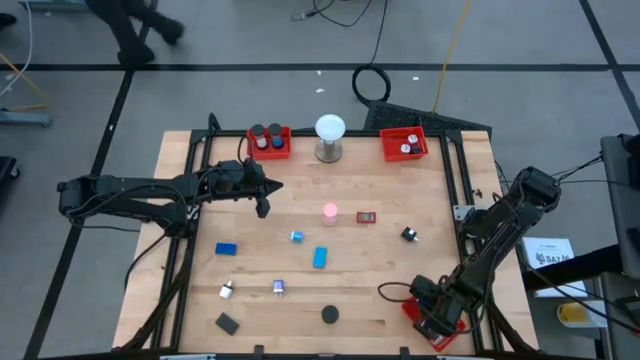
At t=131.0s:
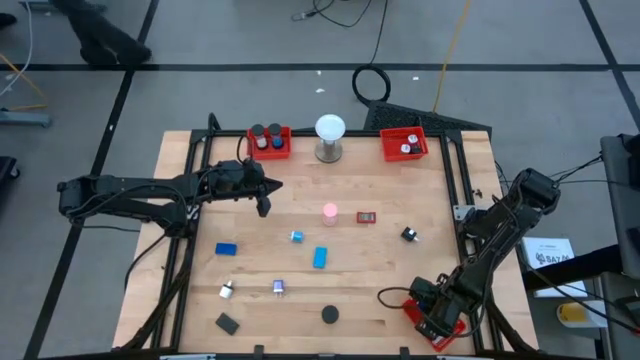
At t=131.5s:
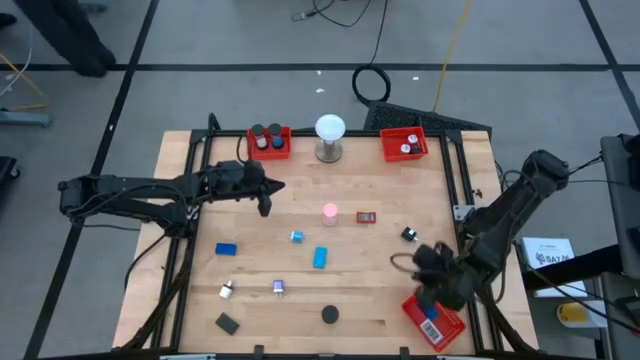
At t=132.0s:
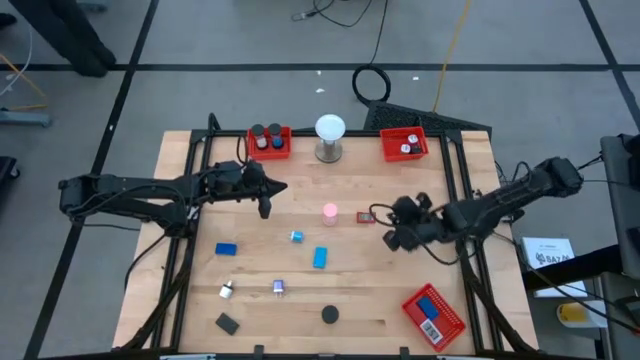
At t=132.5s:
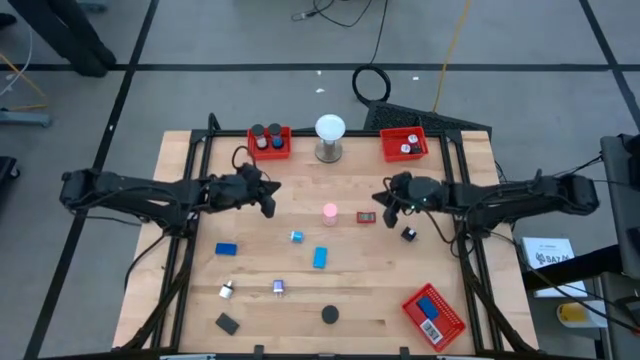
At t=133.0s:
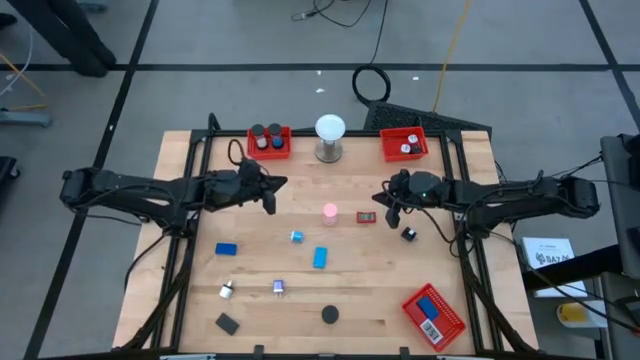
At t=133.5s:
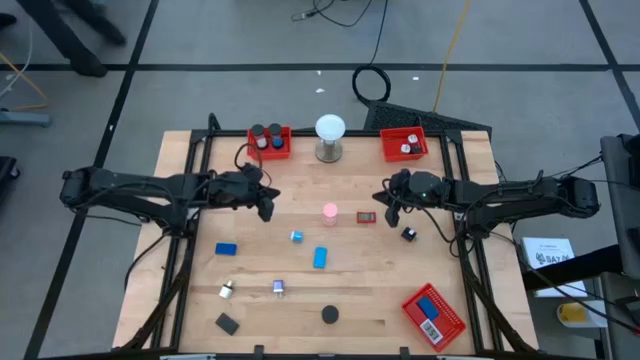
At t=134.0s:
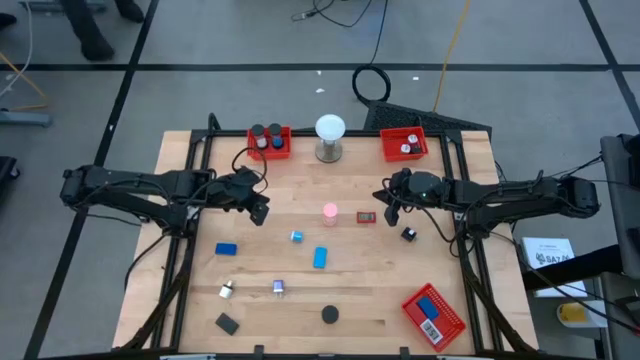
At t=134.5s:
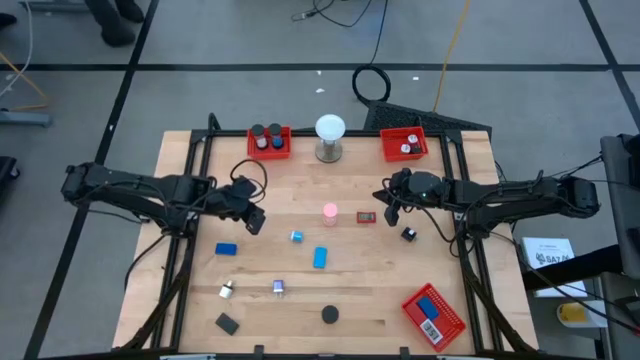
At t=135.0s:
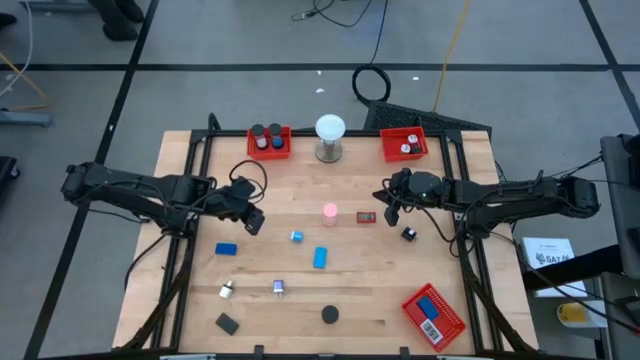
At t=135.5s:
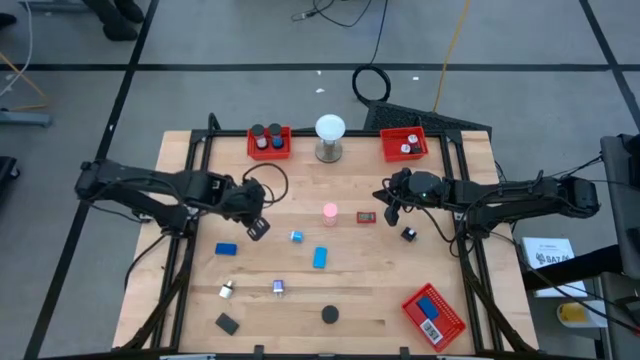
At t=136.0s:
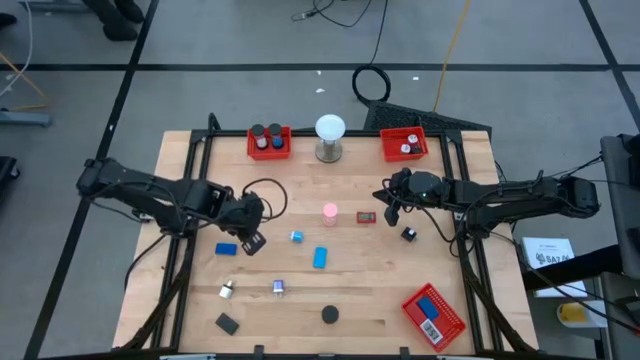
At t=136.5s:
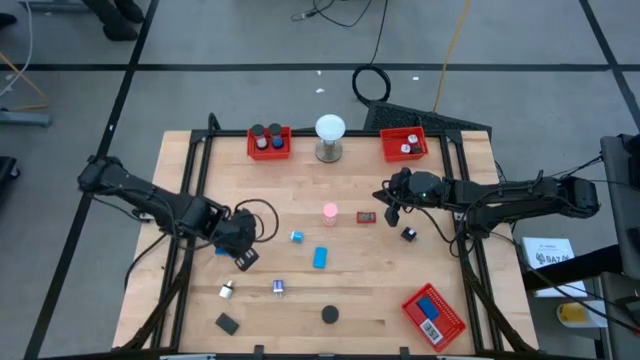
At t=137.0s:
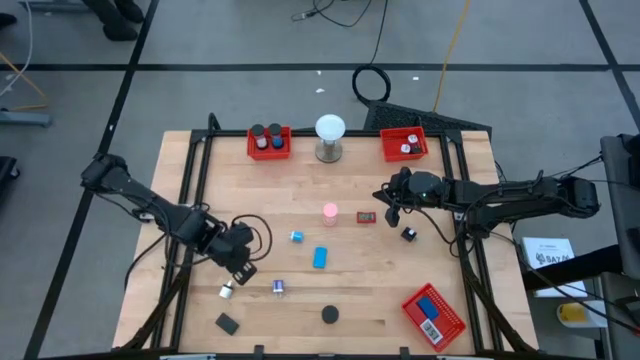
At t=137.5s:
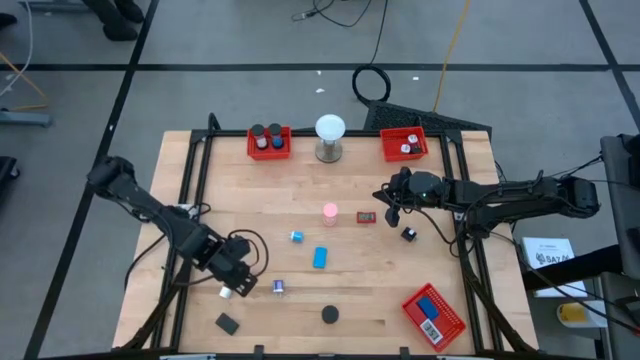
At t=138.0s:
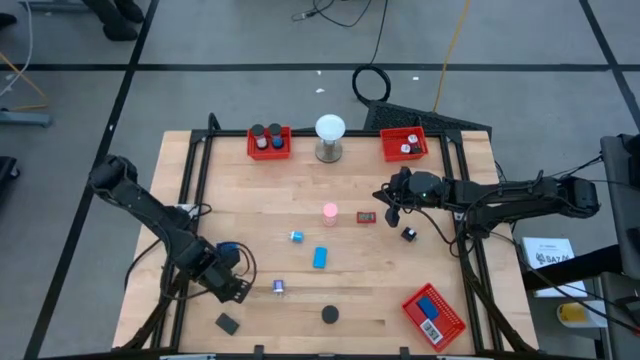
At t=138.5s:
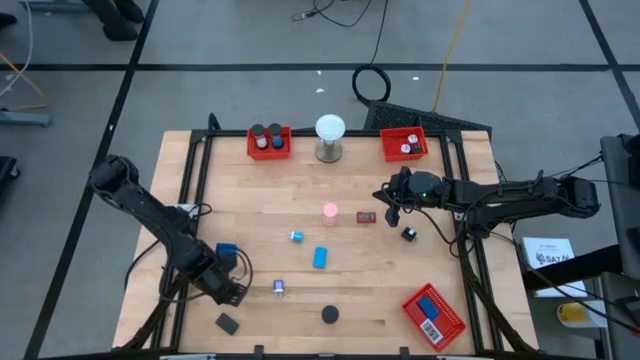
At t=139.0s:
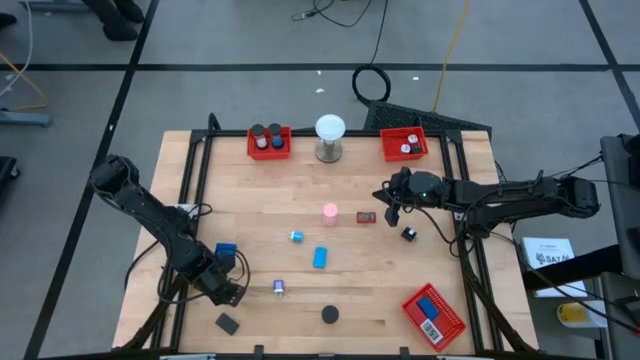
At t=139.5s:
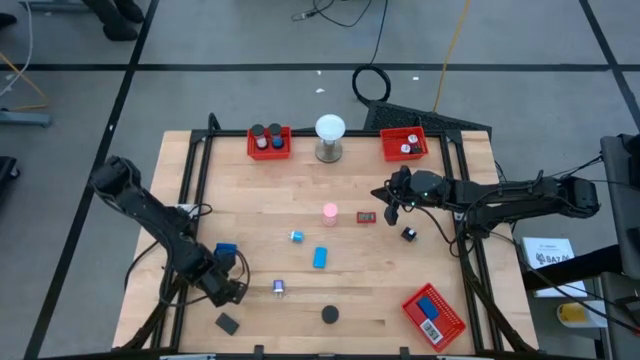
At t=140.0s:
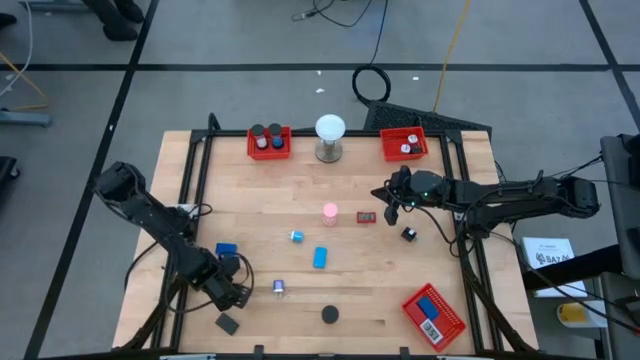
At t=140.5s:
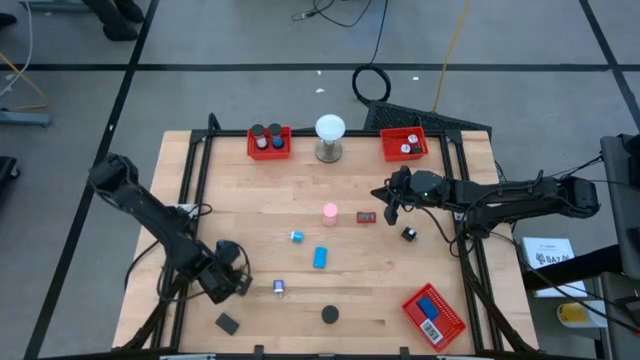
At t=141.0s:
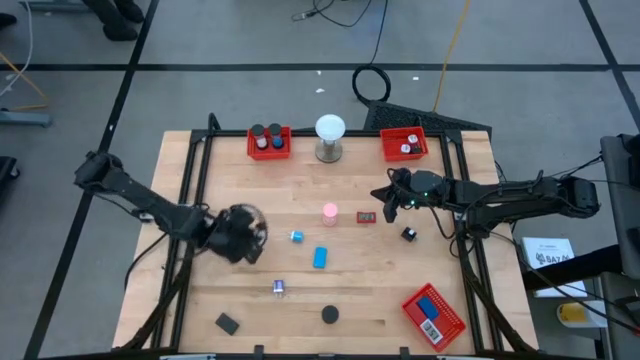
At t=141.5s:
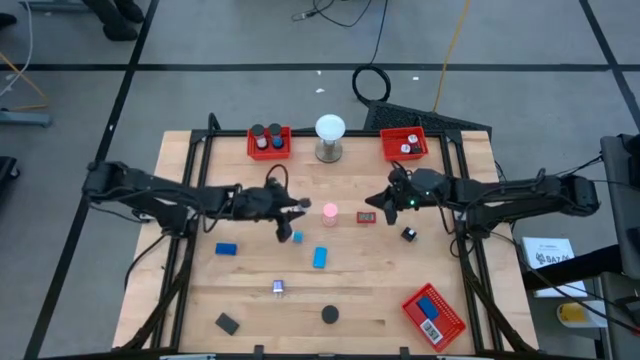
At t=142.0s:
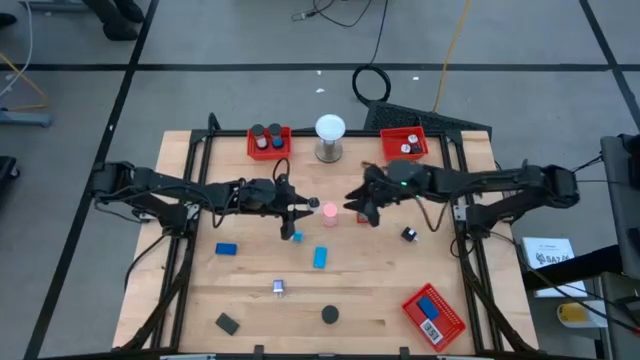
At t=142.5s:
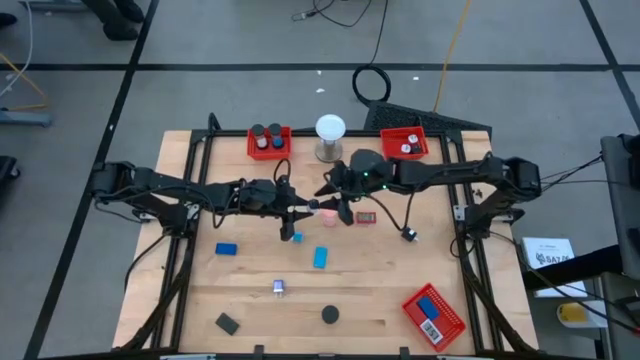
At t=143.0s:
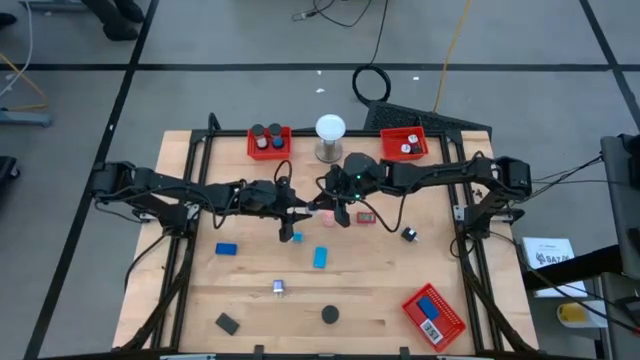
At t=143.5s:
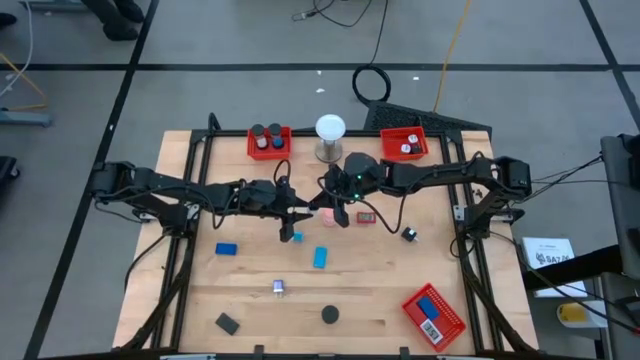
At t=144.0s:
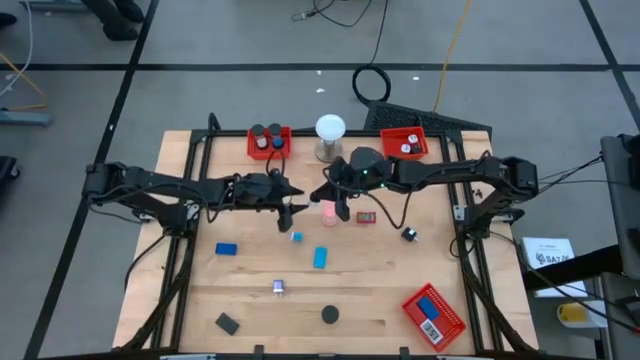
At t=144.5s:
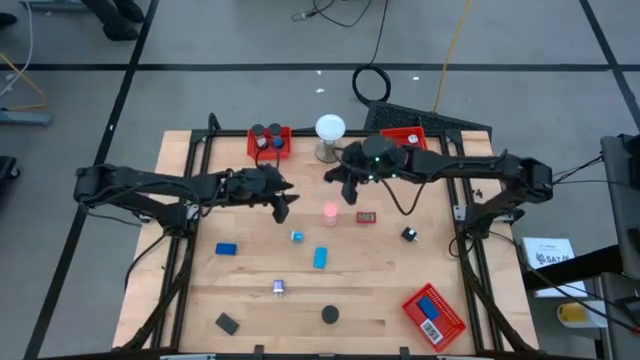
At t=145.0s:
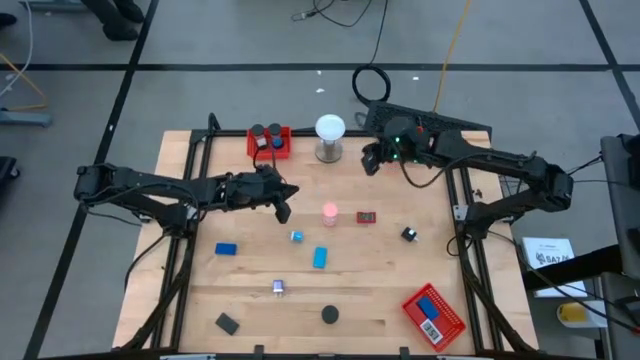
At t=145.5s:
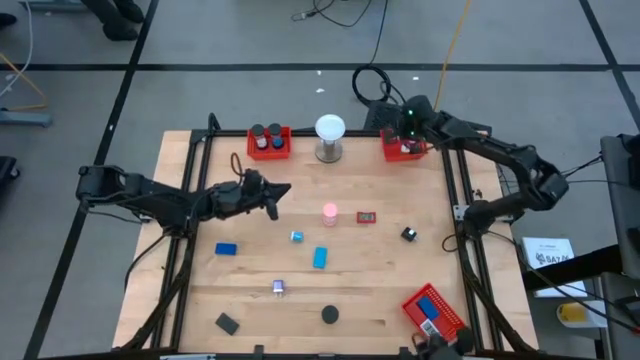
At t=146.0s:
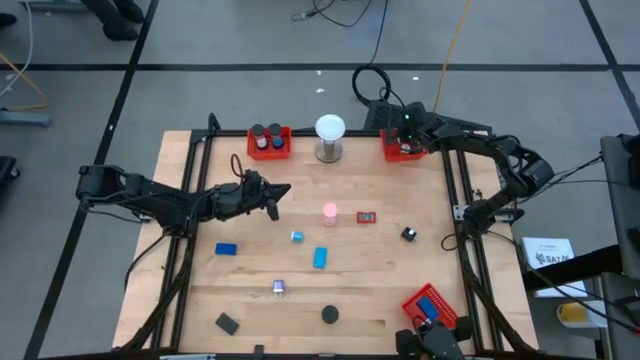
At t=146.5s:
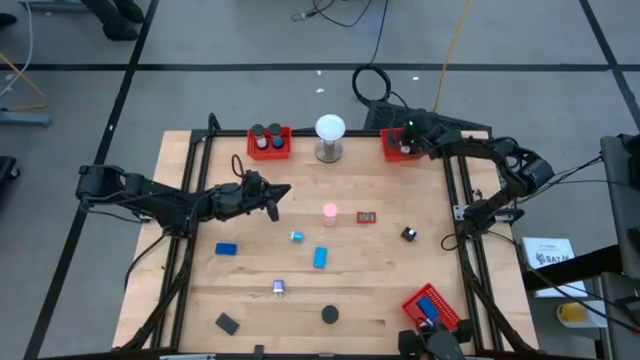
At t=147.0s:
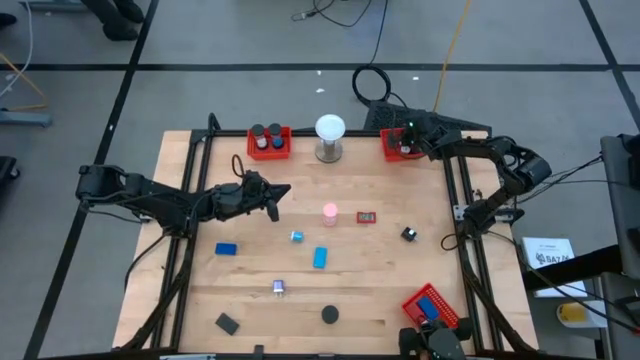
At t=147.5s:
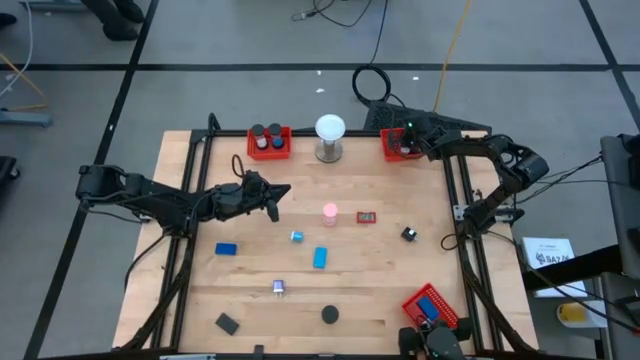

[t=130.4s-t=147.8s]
Task: Pick & Place Office items
Put the white charger adapter into the top right red bin
